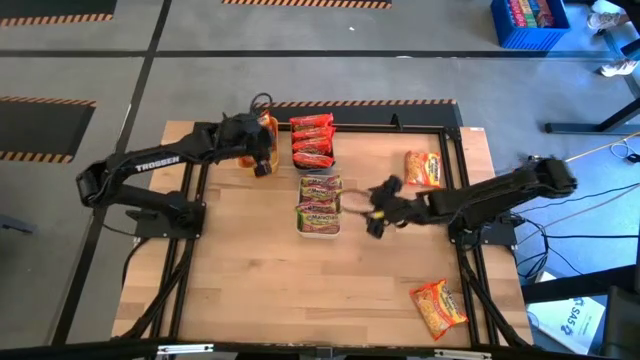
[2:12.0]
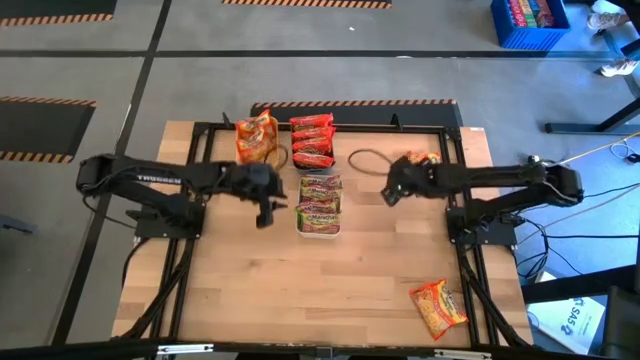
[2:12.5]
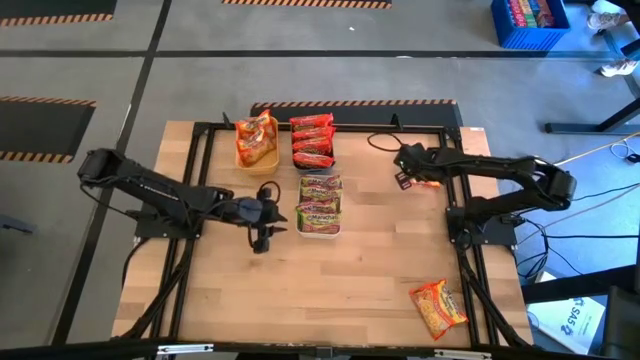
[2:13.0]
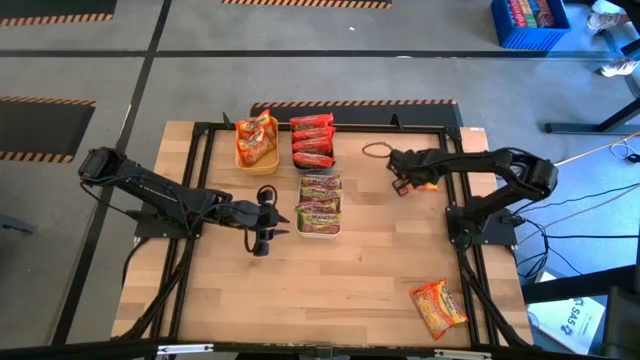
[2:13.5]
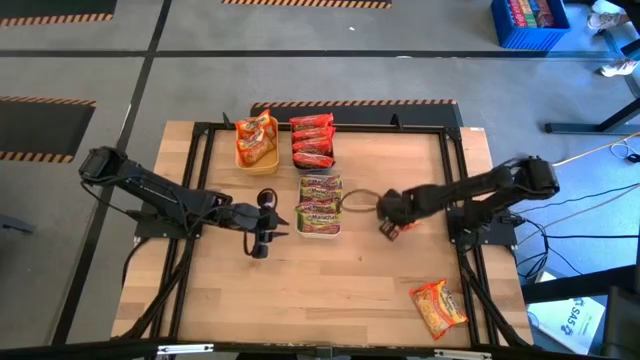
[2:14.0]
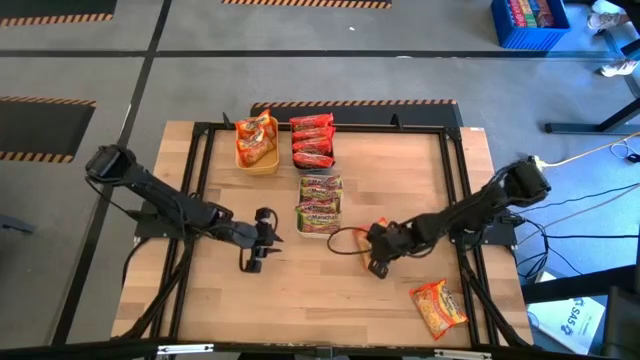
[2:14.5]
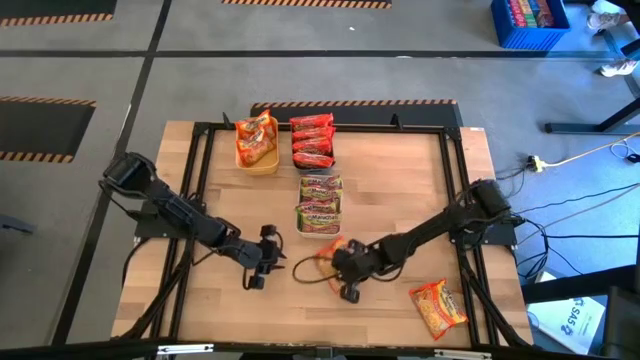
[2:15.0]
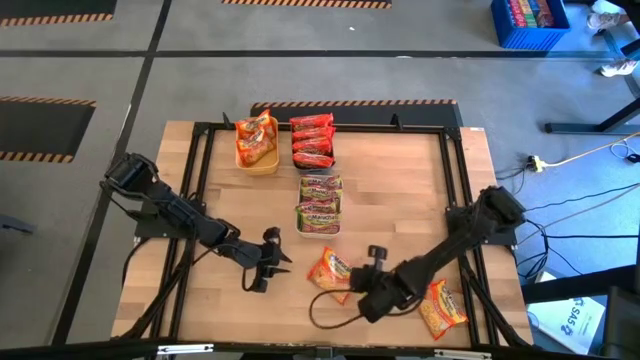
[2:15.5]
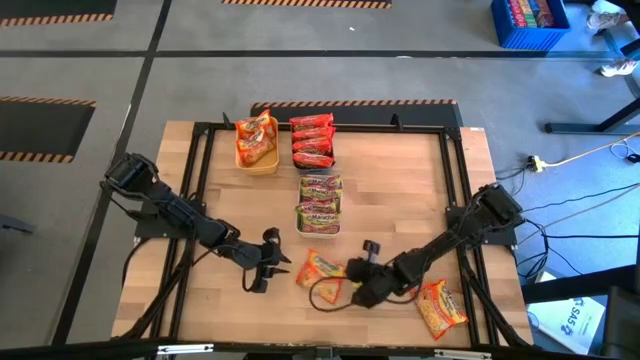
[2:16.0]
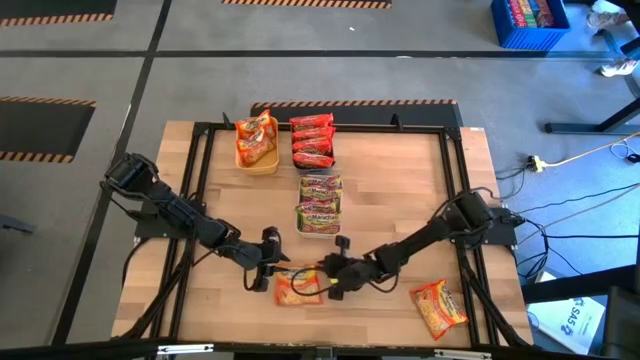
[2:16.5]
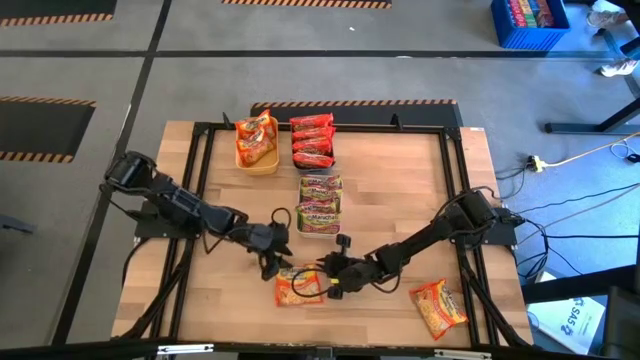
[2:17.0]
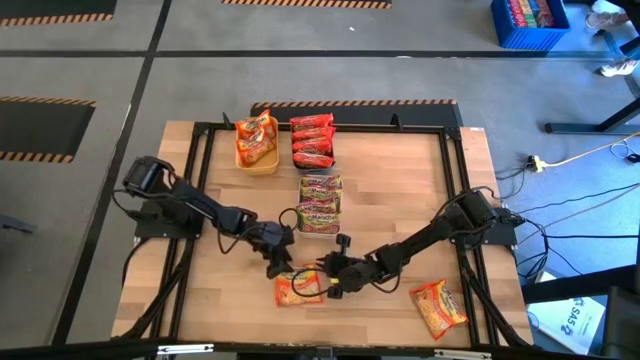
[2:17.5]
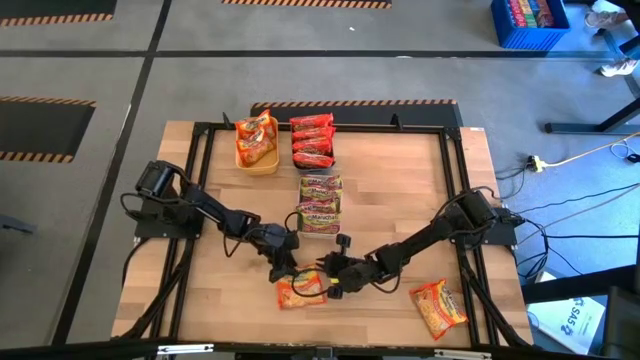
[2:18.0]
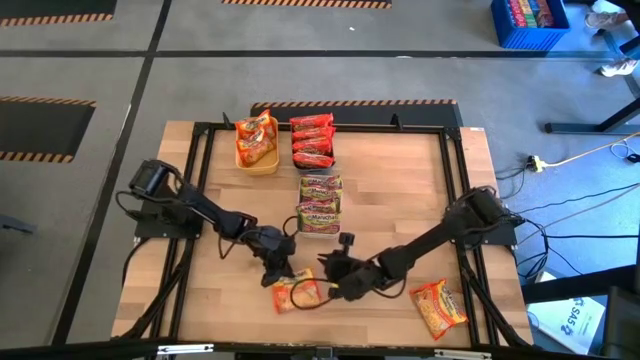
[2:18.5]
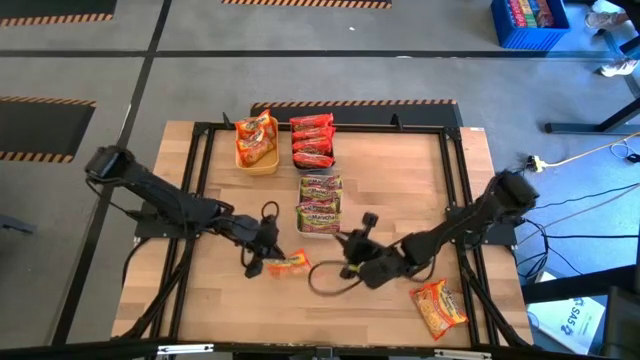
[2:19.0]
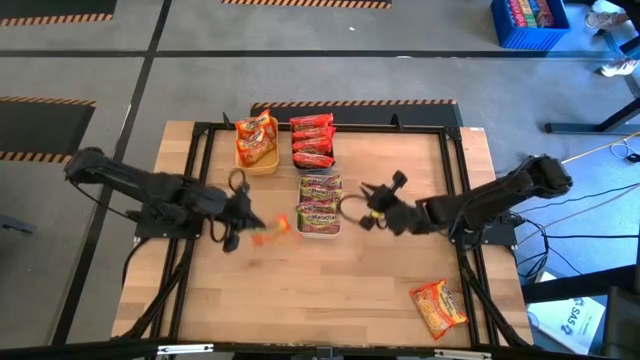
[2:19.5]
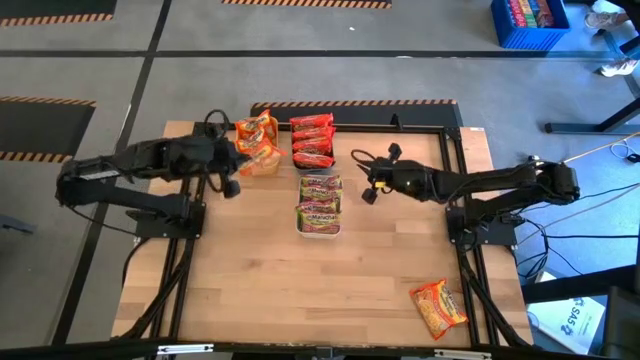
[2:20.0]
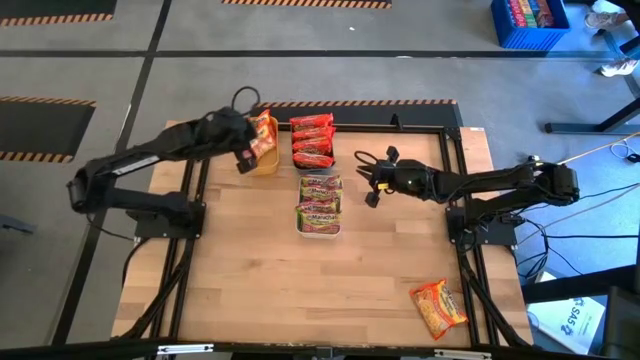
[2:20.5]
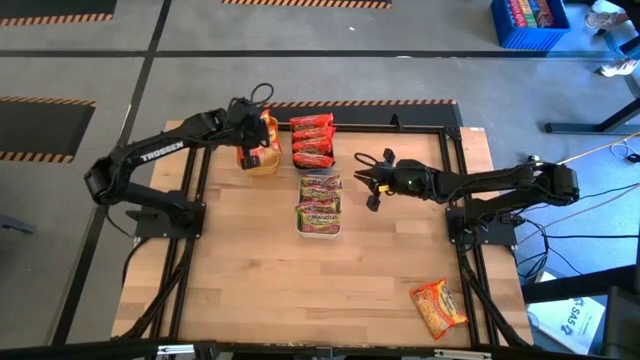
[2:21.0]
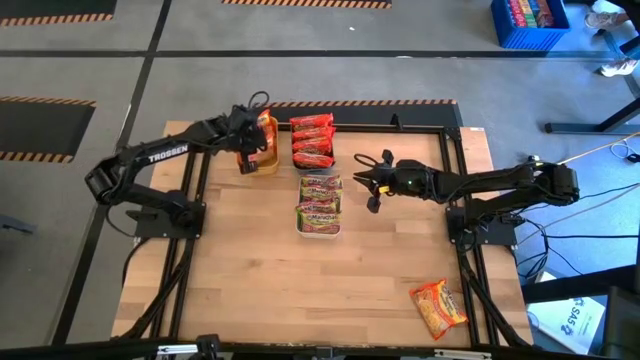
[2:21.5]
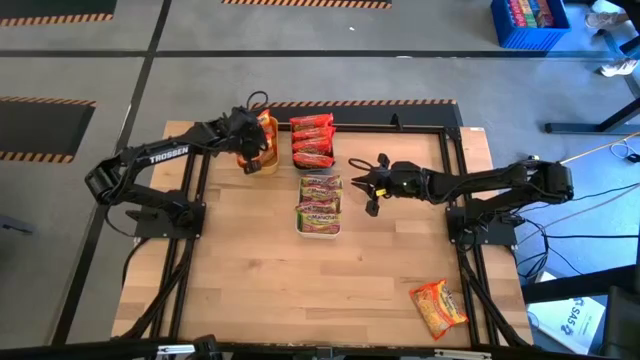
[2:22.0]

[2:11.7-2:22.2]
Task: Sort Maruchan noodles
Put the top orange noodle pack into the yellow bin

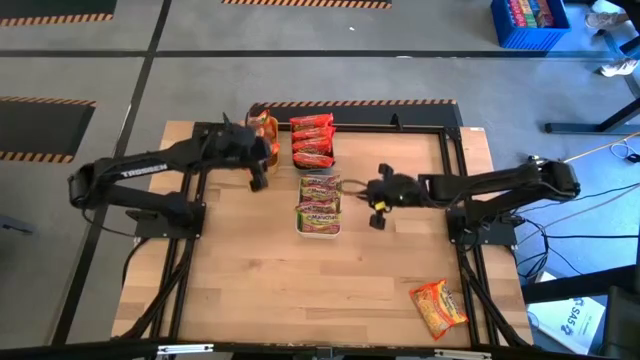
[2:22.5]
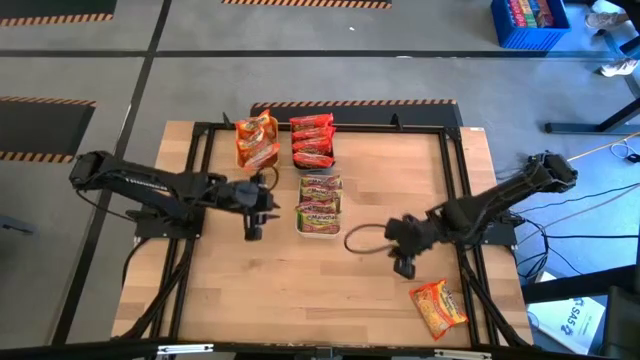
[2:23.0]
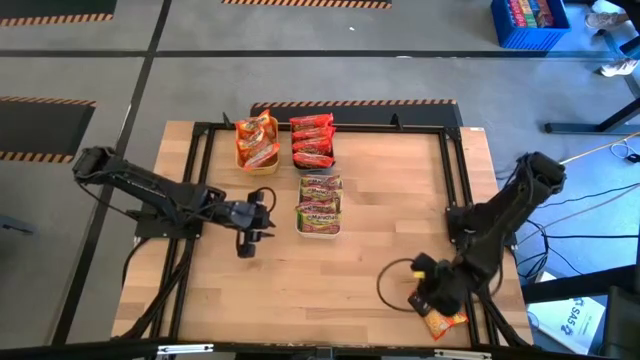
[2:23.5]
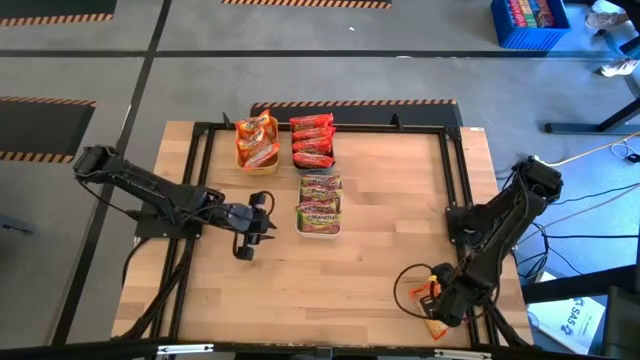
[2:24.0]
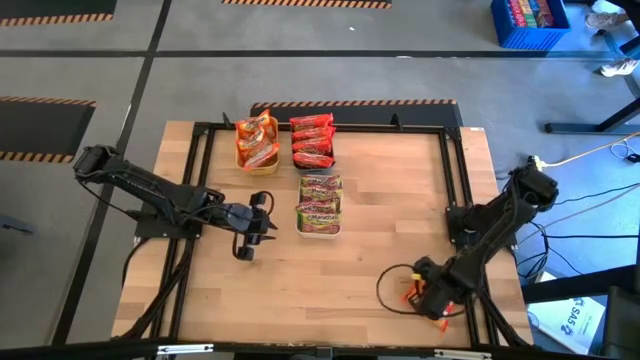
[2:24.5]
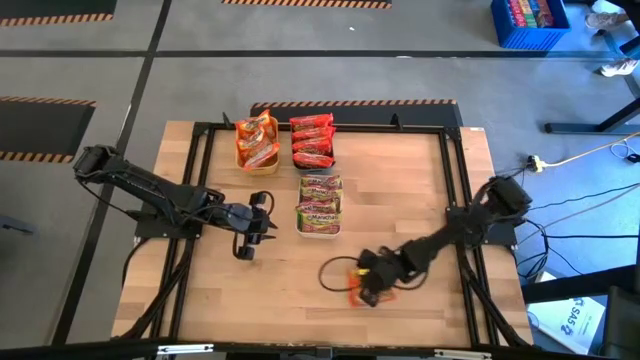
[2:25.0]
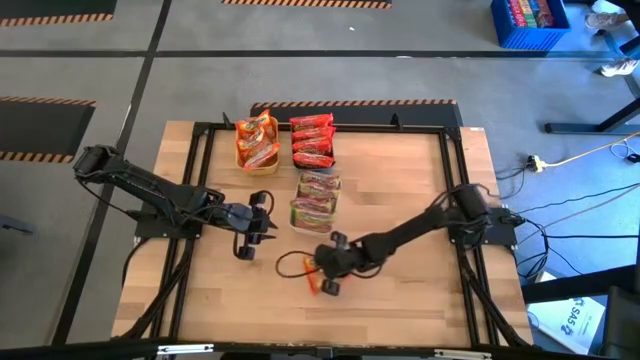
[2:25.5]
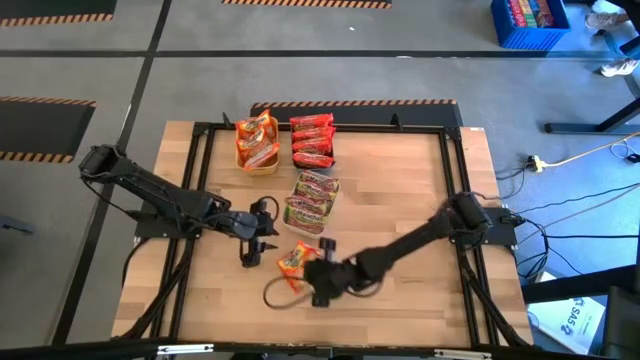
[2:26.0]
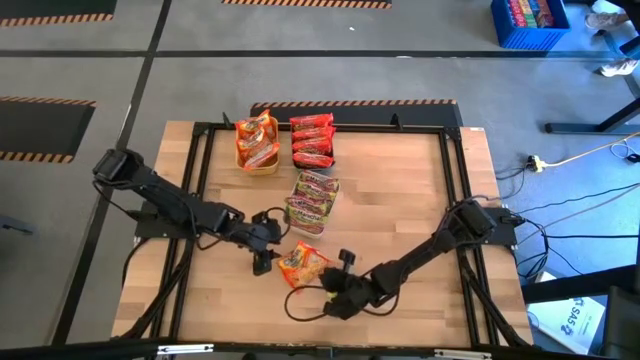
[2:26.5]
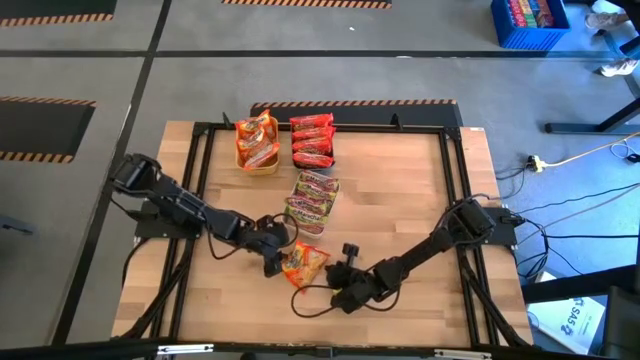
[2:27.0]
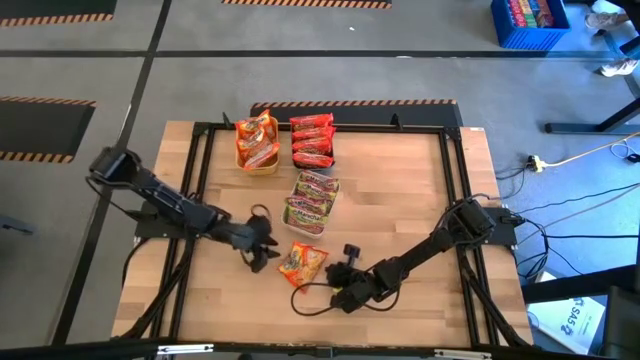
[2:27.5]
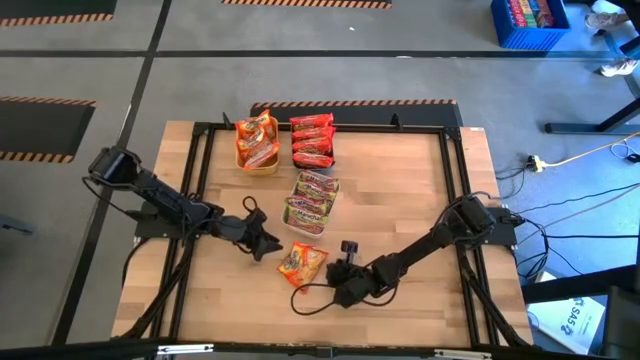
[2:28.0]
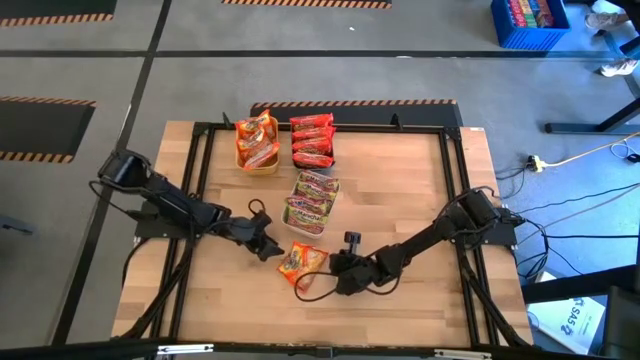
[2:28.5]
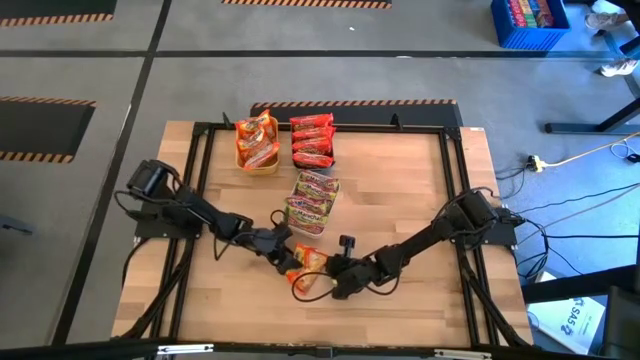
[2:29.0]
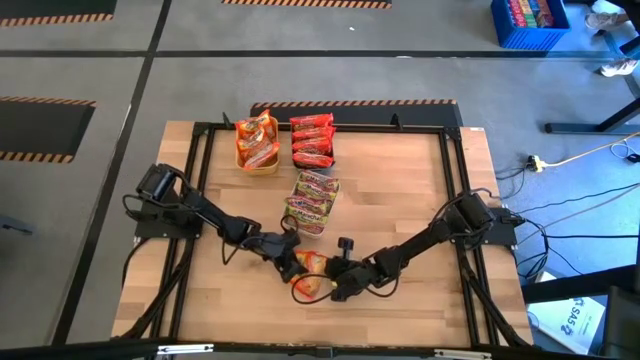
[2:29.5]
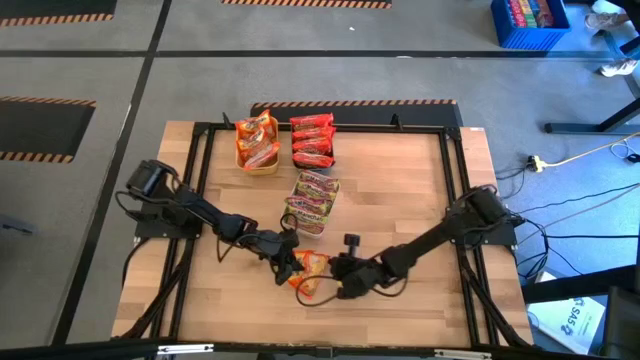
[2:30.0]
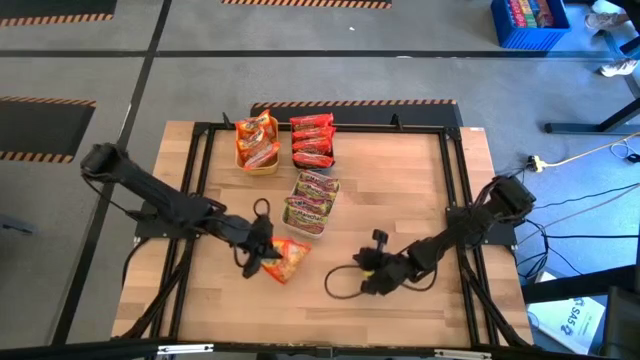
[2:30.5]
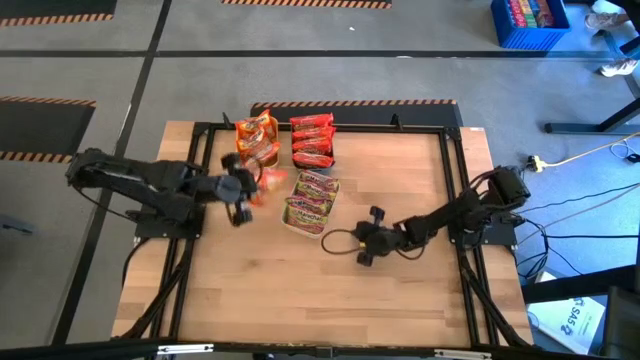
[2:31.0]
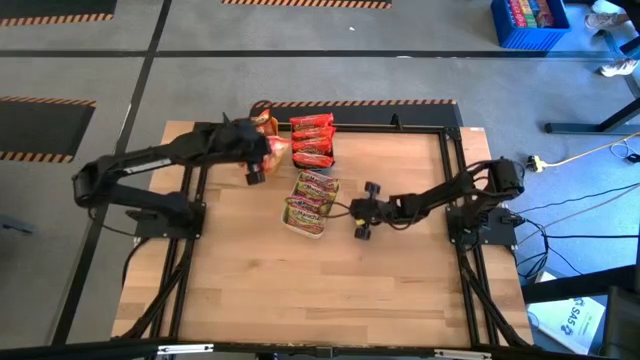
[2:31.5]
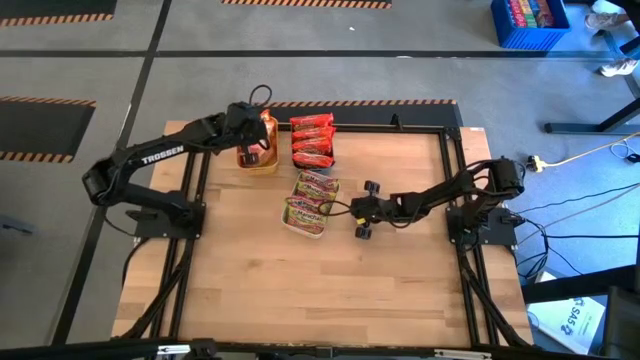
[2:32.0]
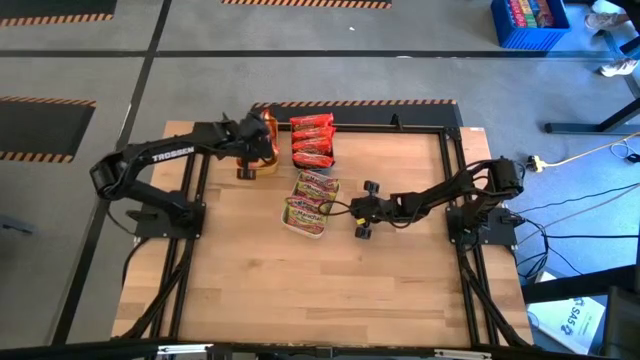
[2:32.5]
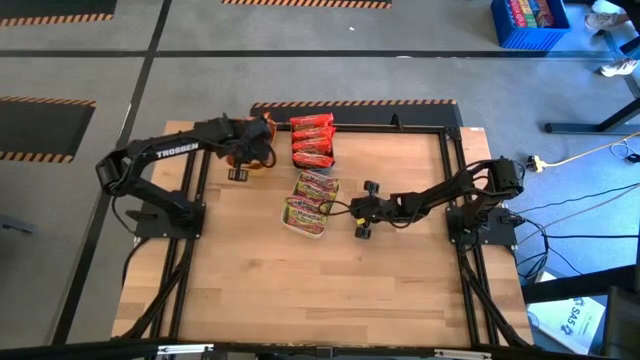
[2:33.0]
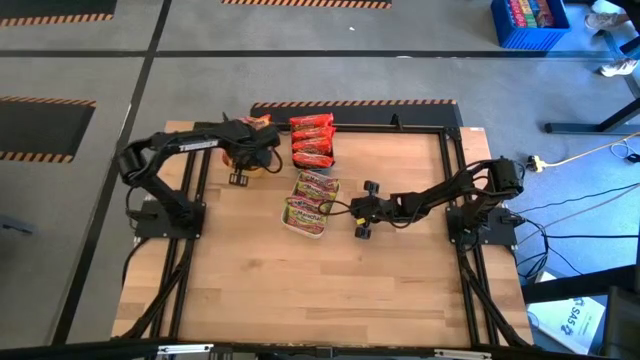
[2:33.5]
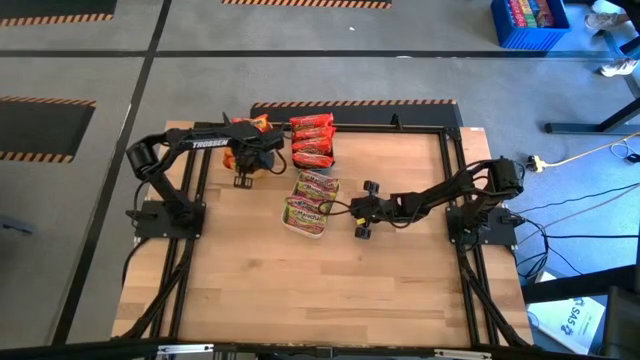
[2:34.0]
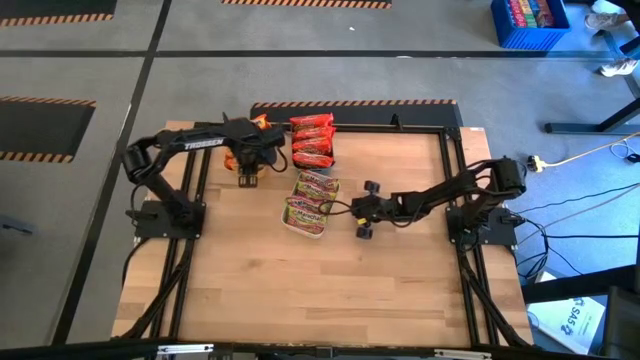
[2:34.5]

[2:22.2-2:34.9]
Put the orange noodle pack into the yellow bin
